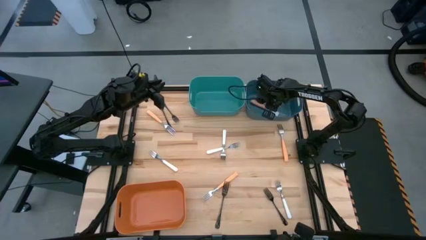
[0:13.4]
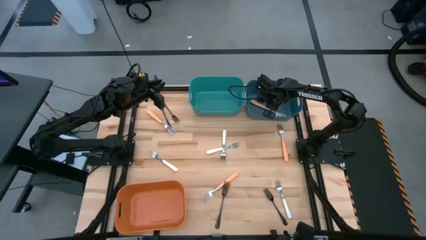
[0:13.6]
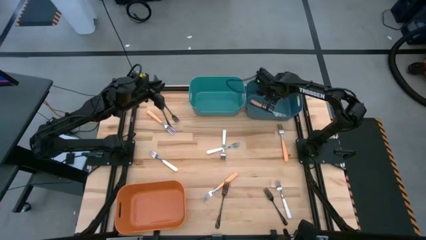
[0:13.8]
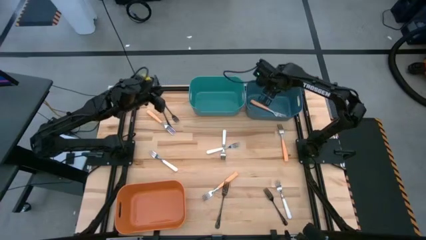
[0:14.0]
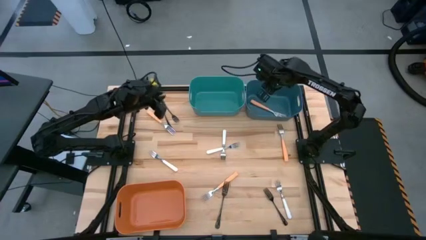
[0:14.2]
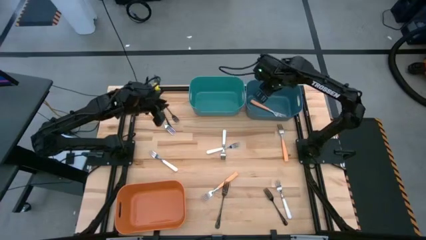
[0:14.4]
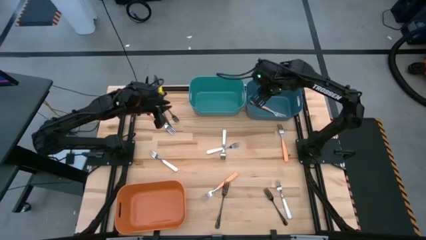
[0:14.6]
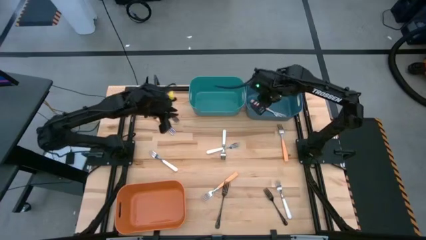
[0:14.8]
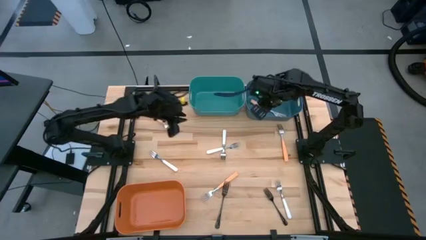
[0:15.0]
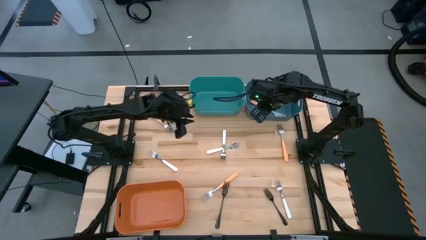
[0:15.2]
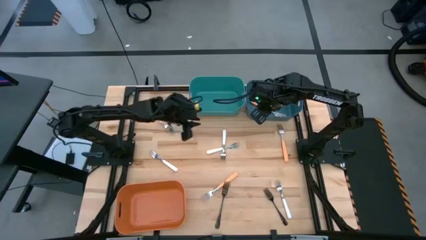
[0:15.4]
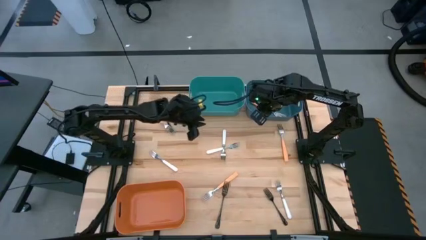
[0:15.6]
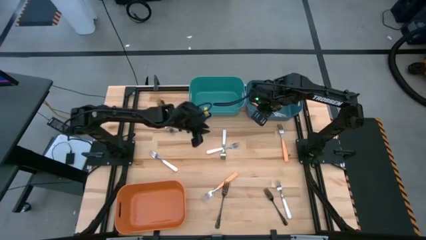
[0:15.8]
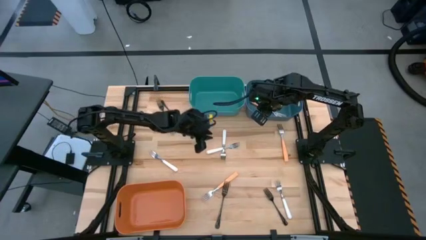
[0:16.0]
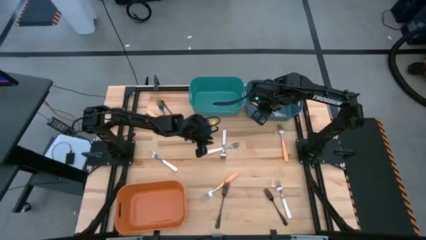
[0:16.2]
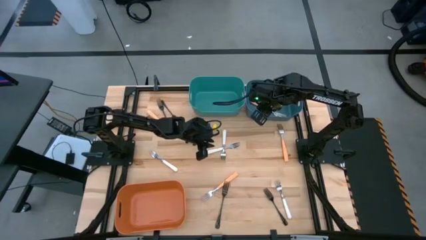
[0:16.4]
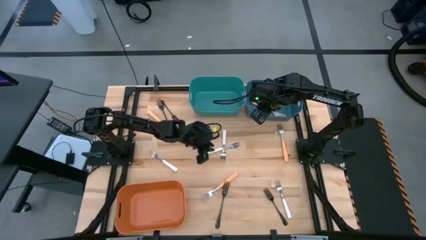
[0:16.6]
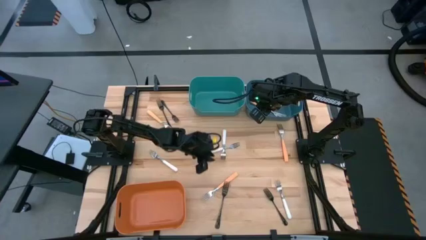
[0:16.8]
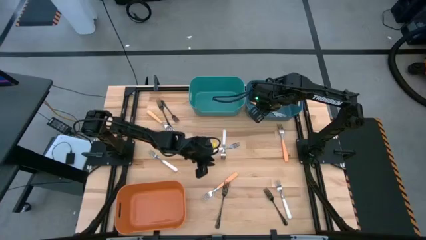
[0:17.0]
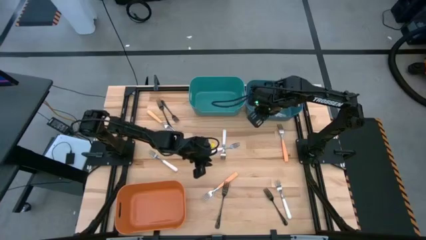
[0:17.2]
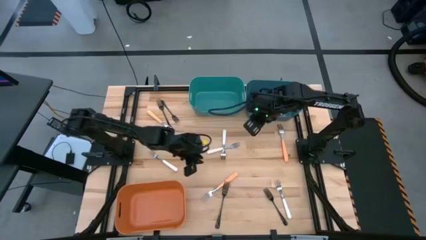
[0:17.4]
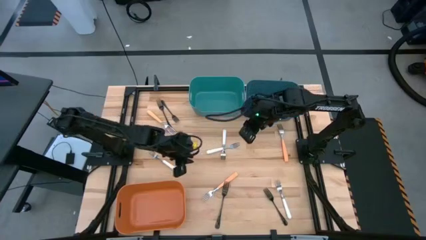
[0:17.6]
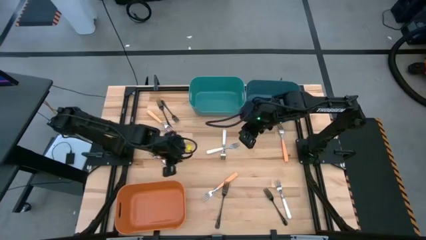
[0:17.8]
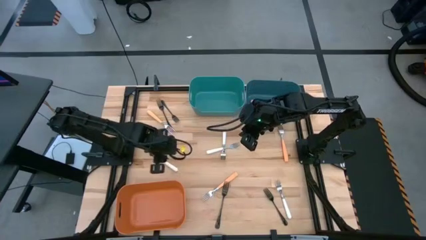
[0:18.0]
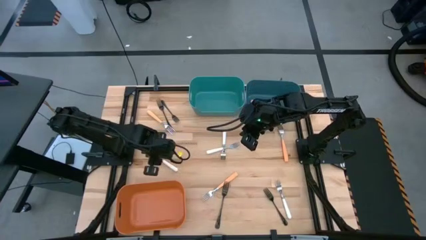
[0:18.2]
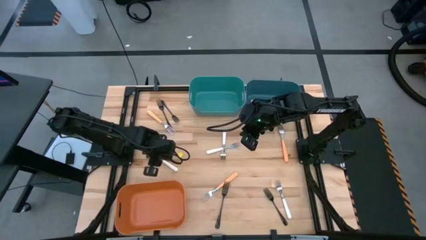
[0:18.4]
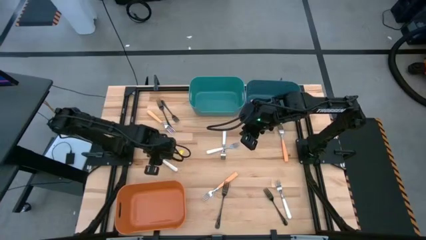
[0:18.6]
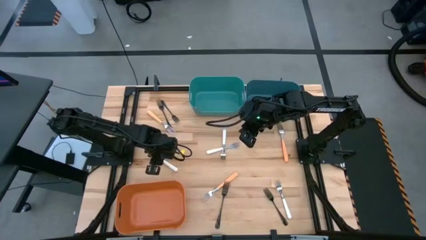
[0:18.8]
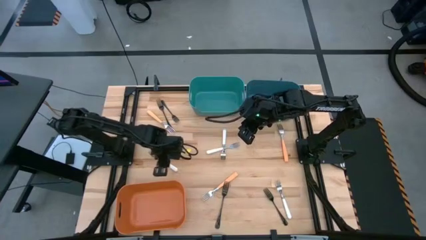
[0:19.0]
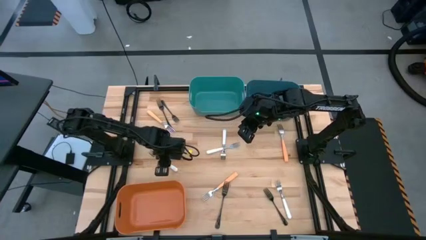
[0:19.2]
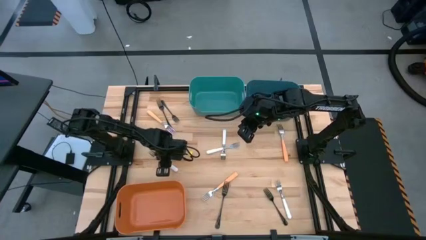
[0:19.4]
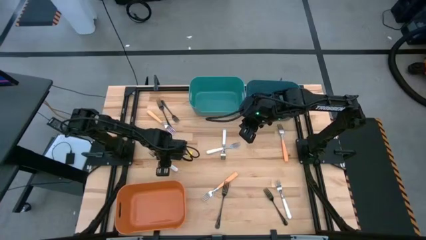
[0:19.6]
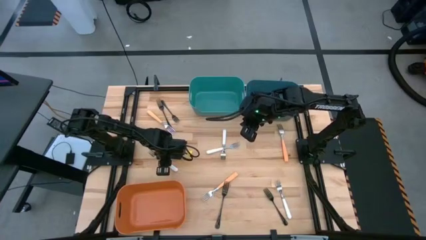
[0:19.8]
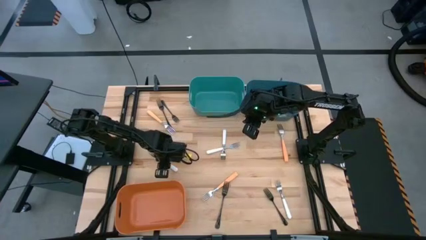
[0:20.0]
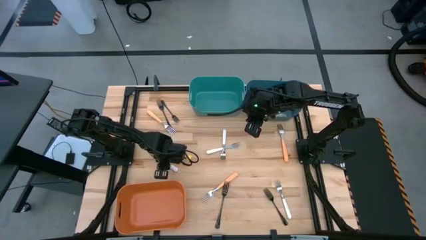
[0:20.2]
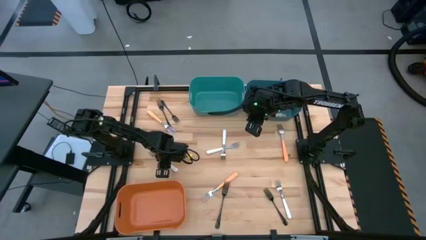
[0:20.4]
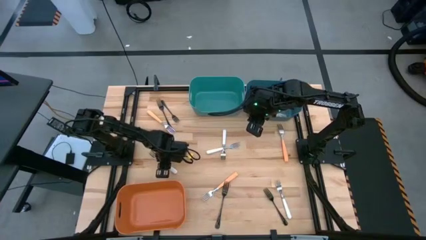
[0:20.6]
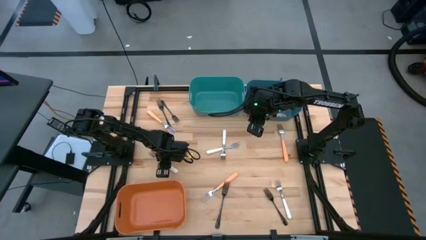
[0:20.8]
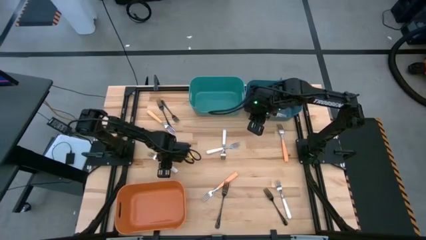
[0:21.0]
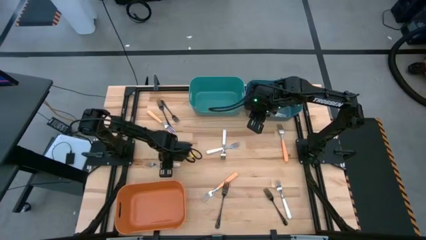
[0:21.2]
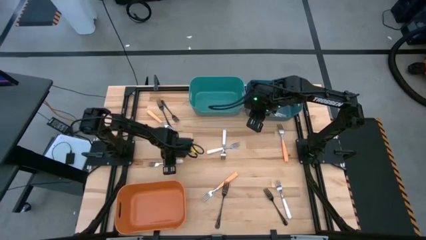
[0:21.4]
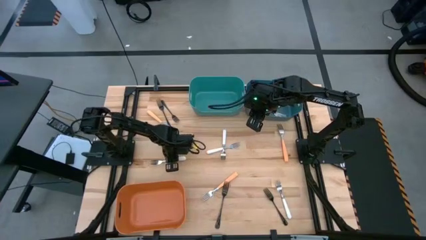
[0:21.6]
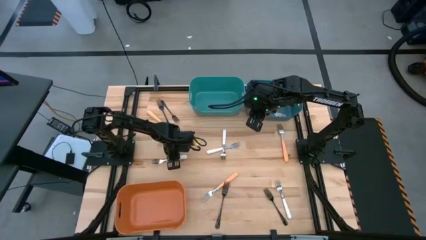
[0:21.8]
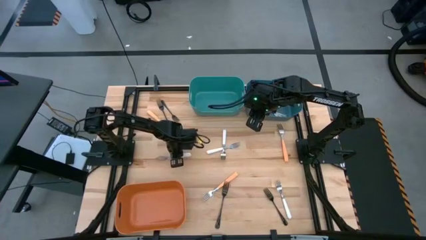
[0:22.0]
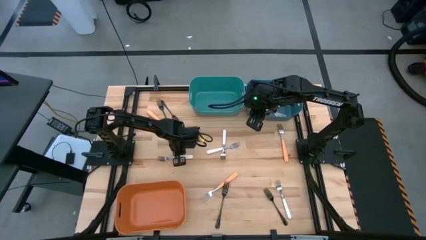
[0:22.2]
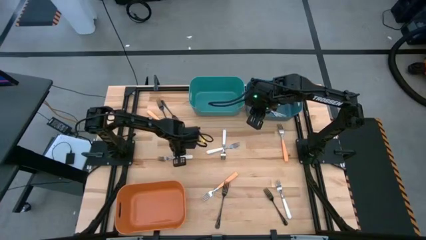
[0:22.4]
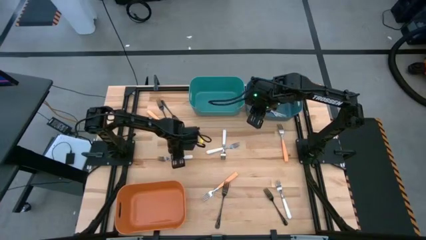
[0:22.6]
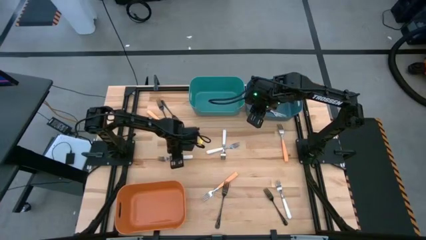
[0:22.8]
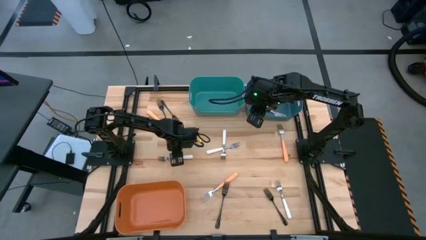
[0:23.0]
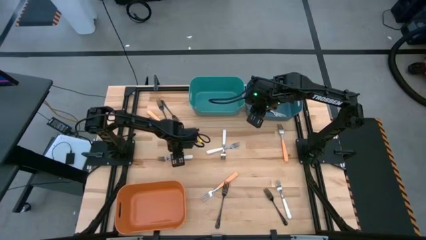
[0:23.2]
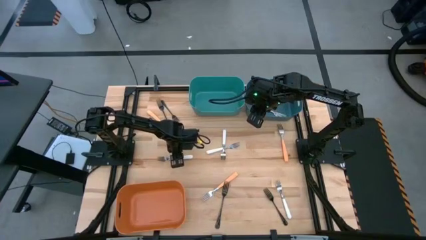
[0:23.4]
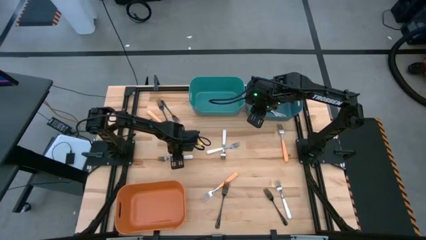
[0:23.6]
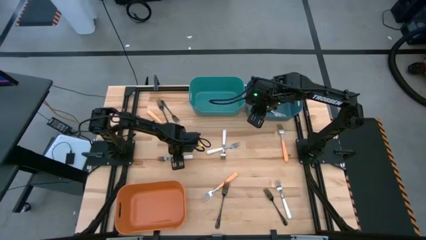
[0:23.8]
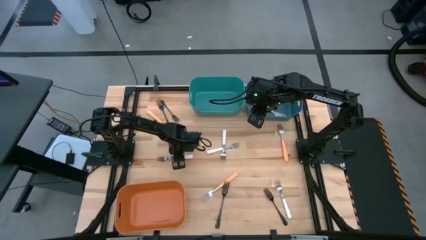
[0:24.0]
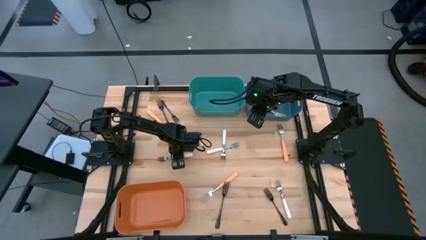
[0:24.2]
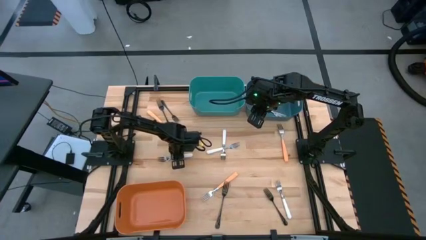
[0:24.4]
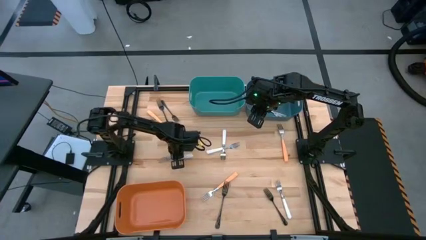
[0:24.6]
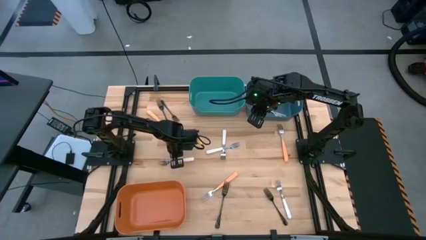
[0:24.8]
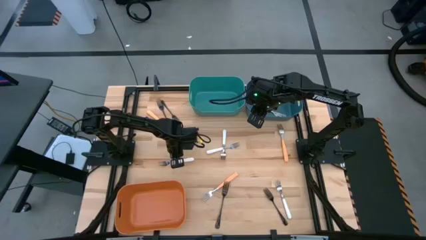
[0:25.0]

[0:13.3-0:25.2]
Task: Sort silverware by color (type)
Put the white fork into the green bin

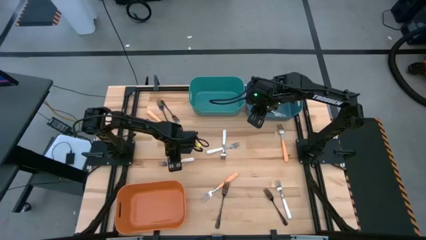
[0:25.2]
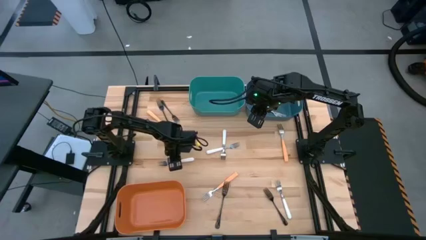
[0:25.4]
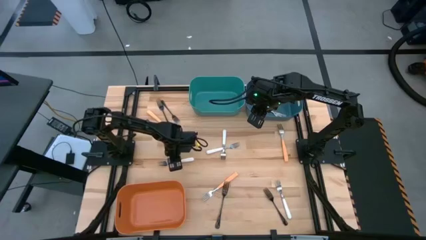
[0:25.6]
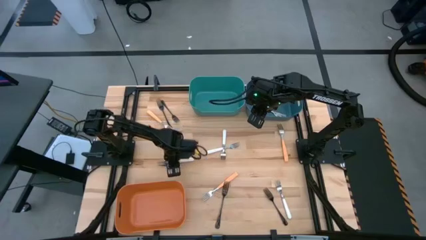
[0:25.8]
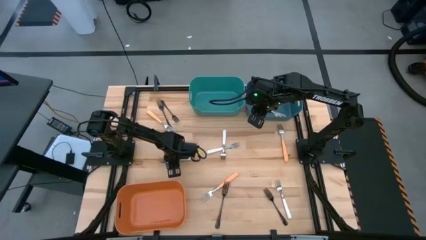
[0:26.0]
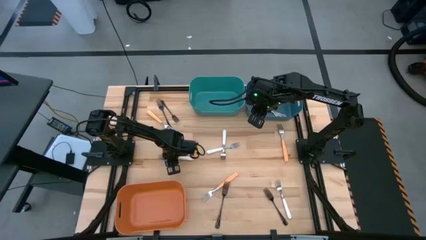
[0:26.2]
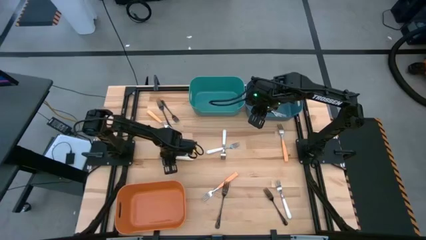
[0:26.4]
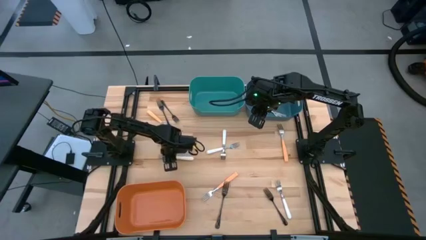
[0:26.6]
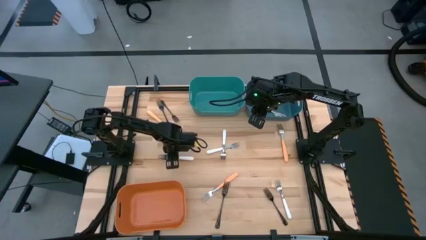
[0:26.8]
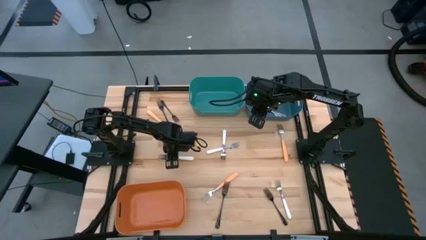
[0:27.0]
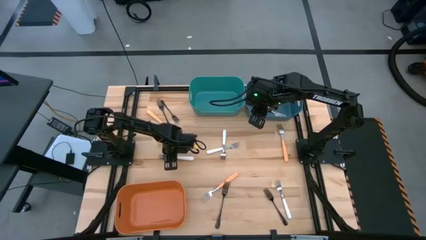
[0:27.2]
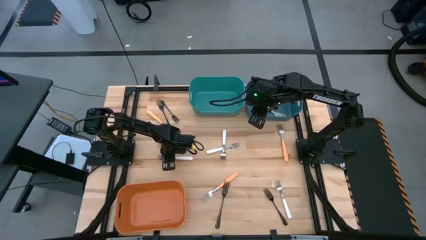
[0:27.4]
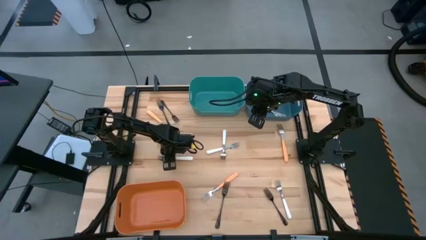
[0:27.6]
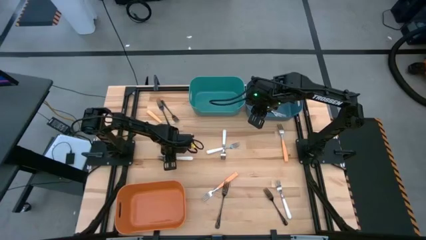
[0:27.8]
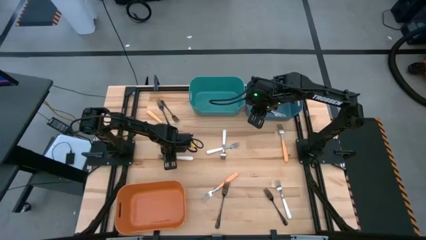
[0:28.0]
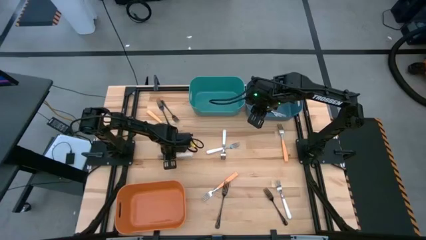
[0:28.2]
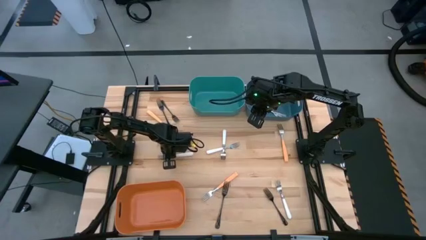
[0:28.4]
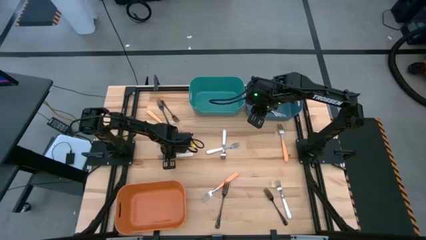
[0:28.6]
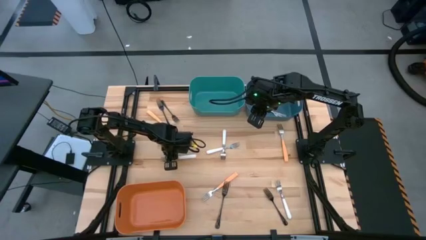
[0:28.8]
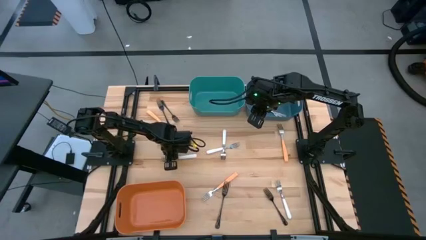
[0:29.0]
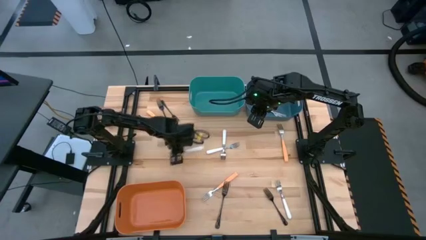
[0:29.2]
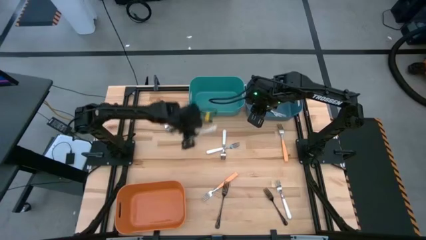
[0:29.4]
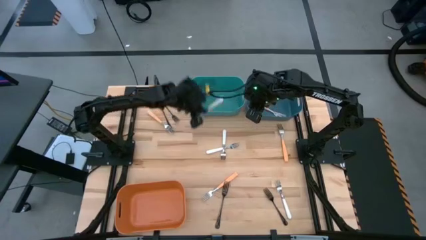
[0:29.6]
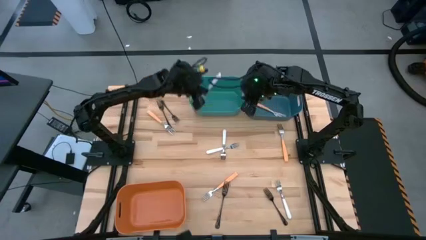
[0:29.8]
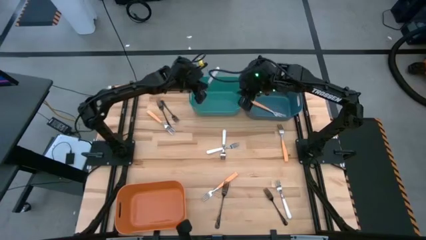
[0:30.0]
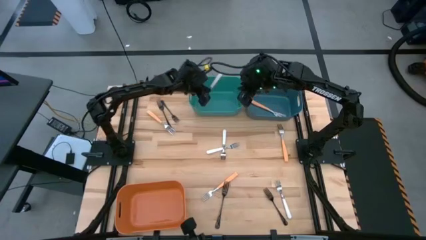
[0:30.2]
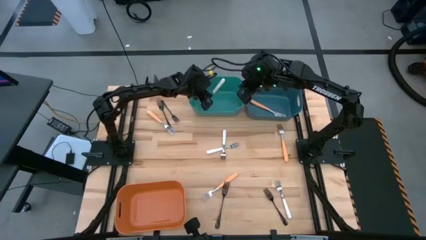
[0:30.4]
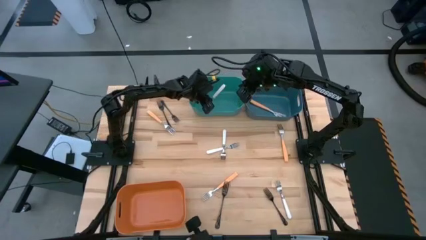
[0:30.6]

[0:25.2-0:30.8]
Put the white fork into the green bin
